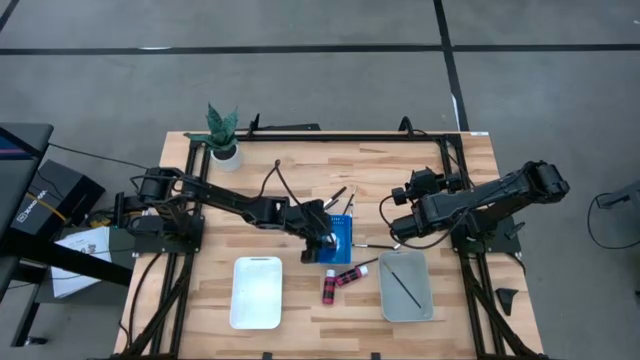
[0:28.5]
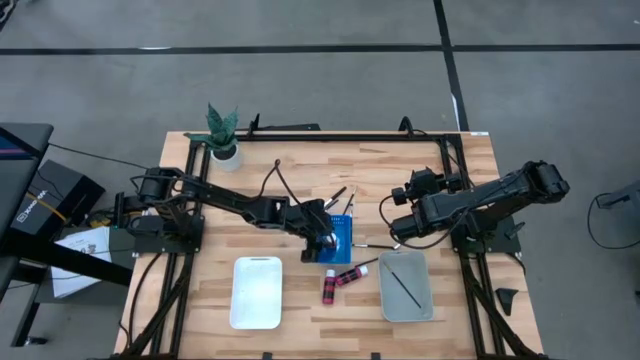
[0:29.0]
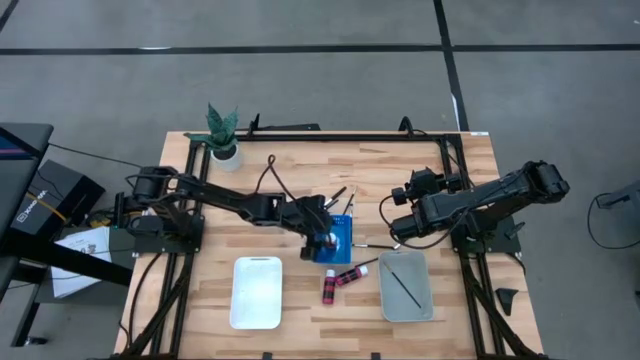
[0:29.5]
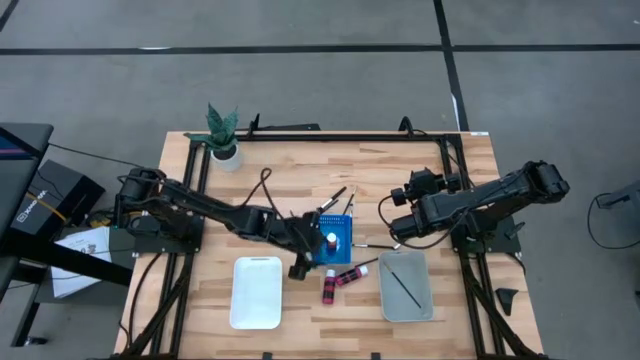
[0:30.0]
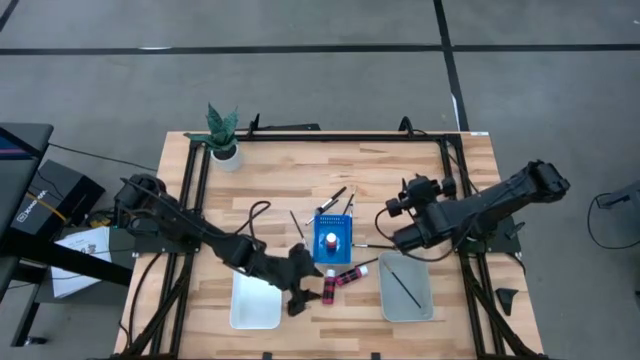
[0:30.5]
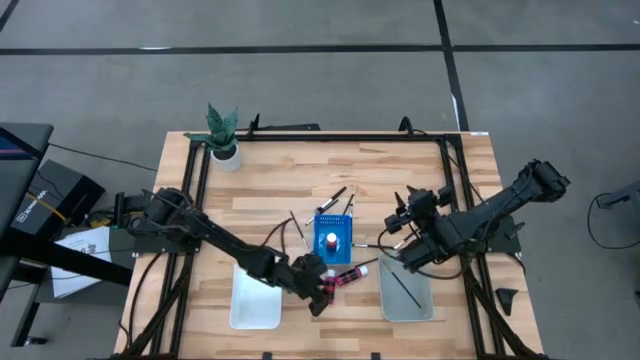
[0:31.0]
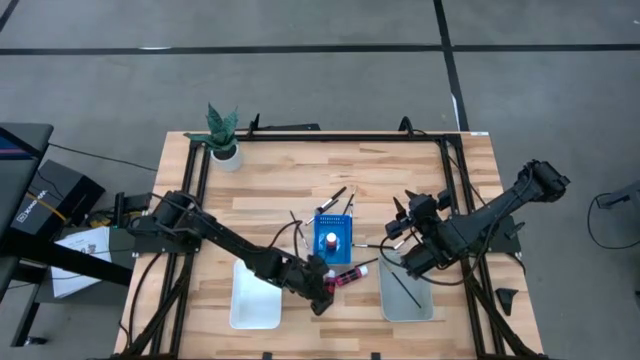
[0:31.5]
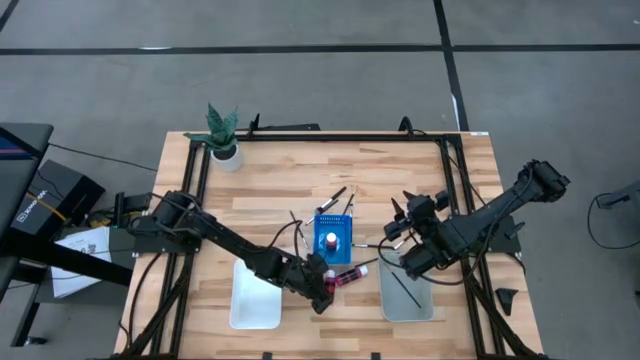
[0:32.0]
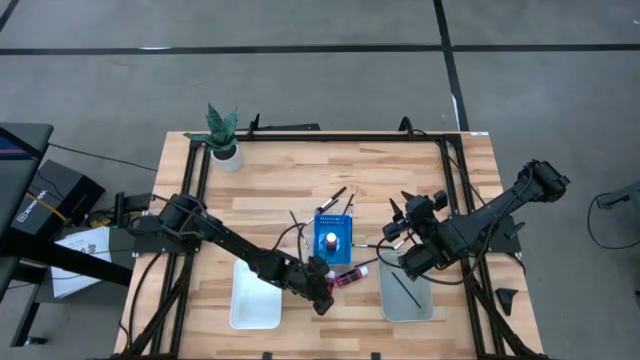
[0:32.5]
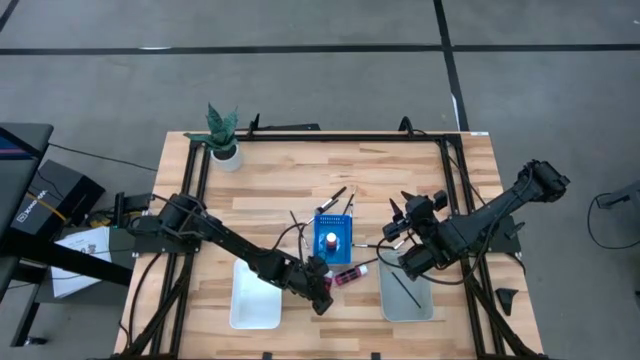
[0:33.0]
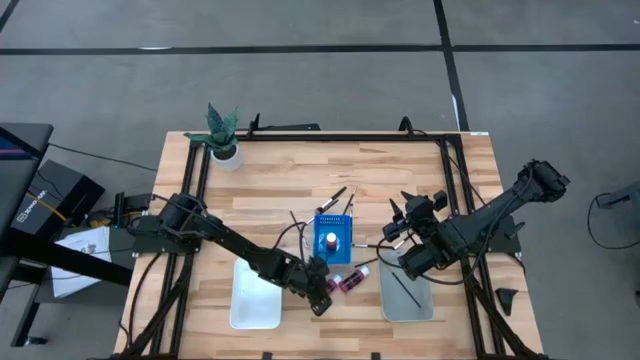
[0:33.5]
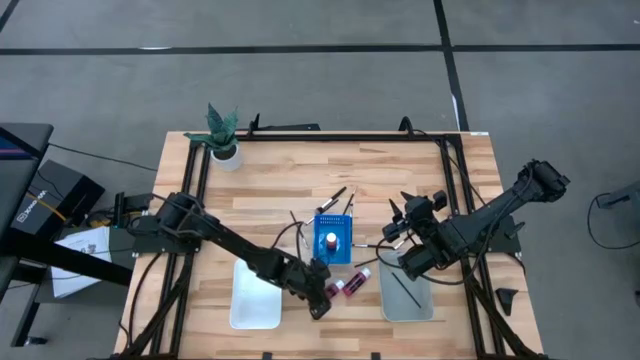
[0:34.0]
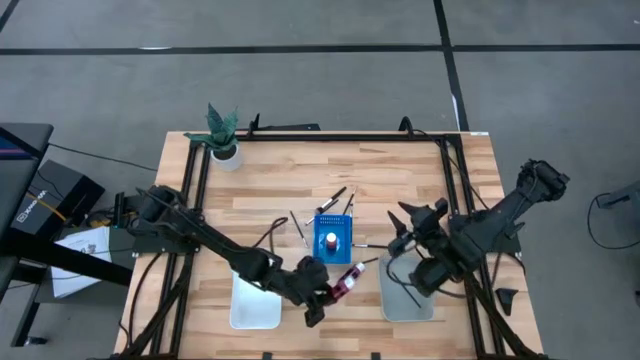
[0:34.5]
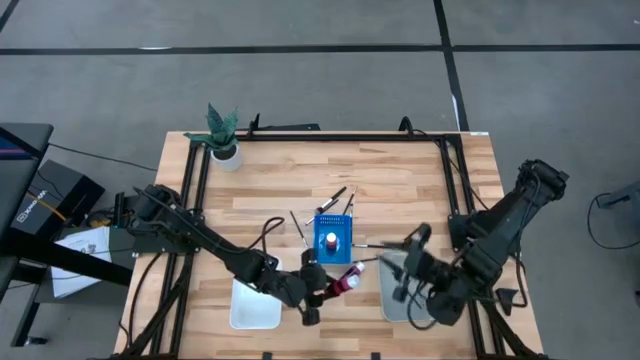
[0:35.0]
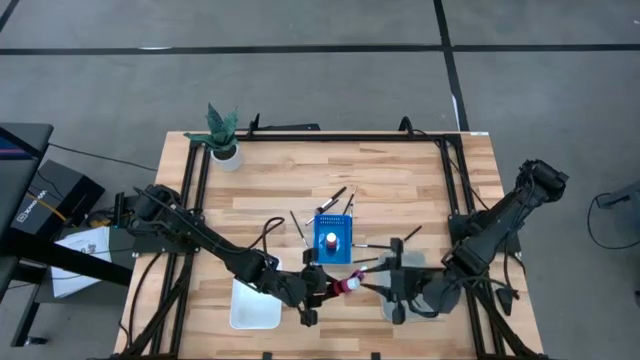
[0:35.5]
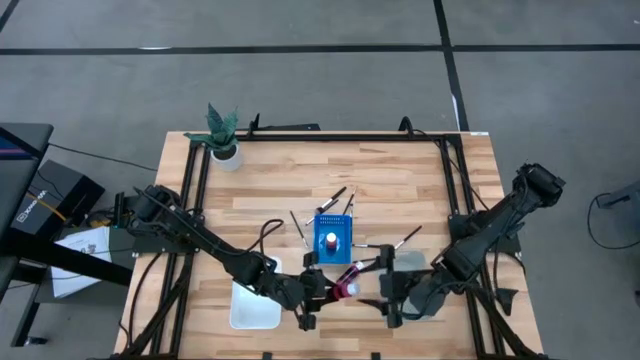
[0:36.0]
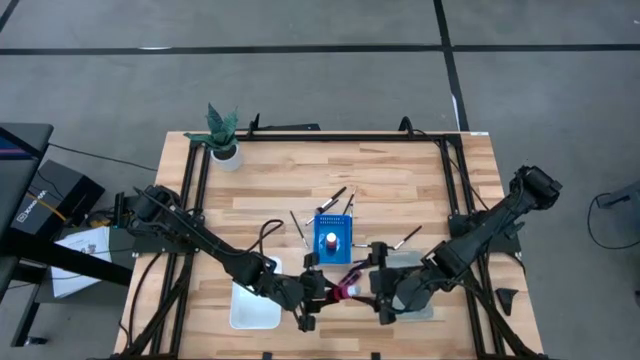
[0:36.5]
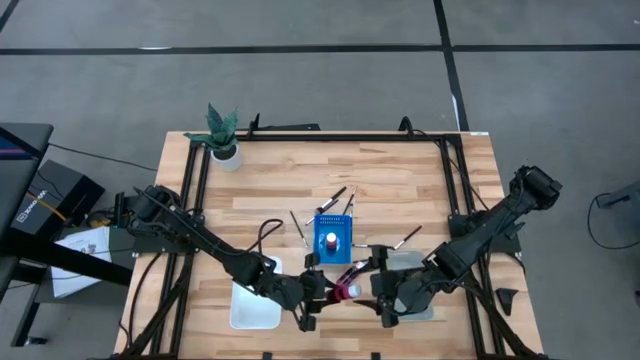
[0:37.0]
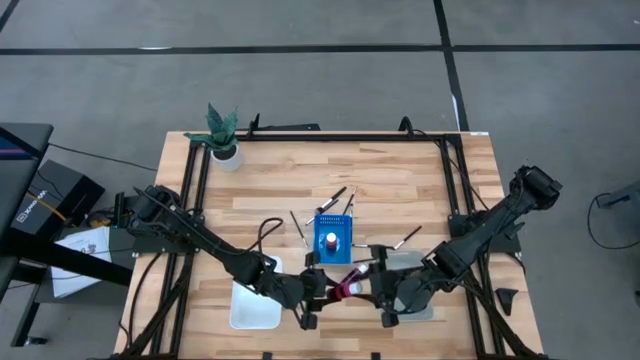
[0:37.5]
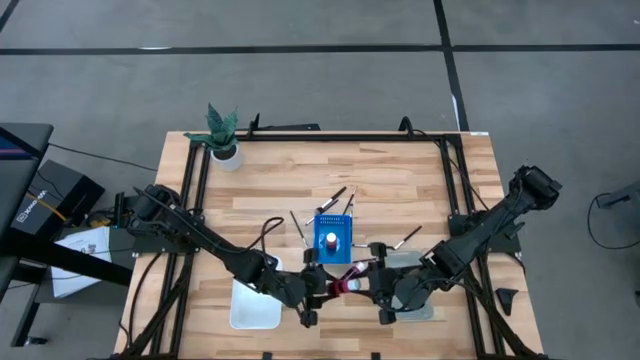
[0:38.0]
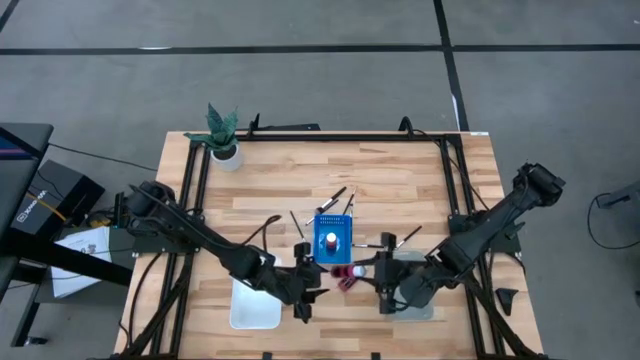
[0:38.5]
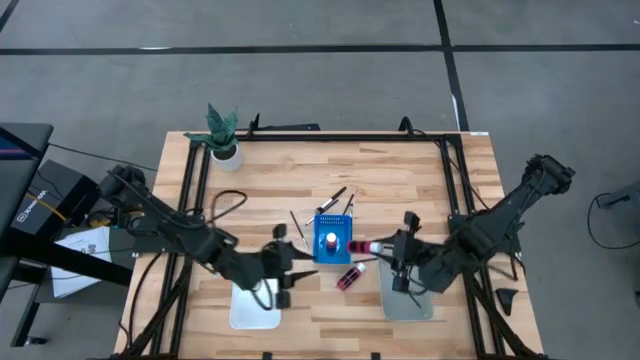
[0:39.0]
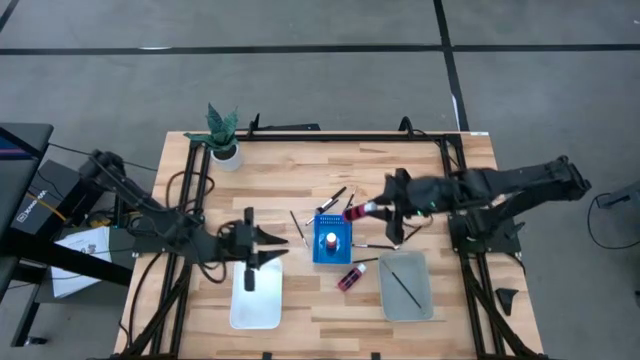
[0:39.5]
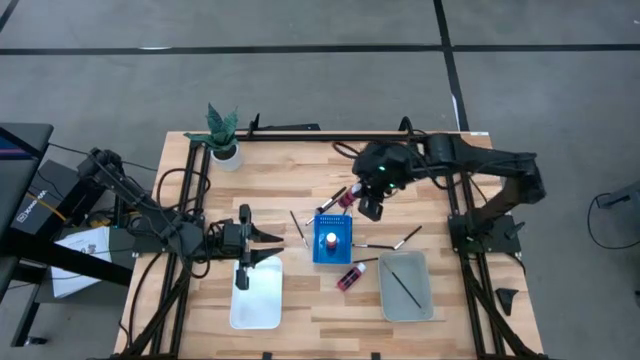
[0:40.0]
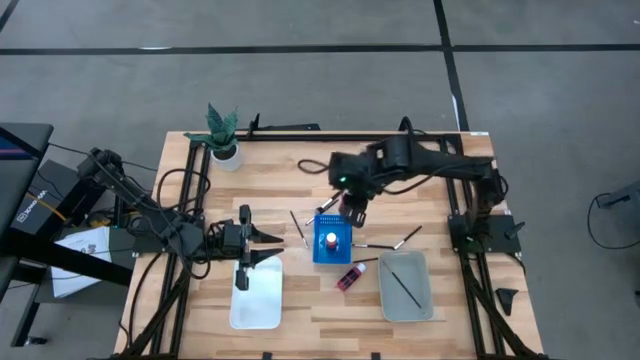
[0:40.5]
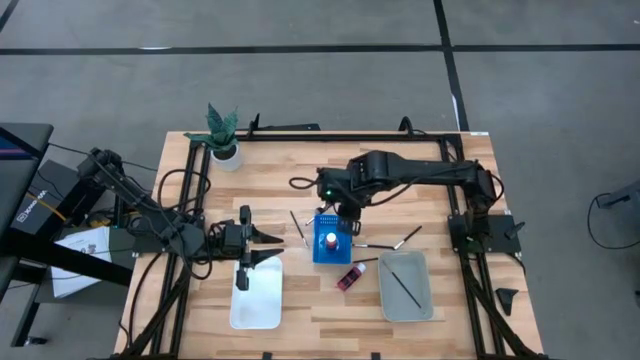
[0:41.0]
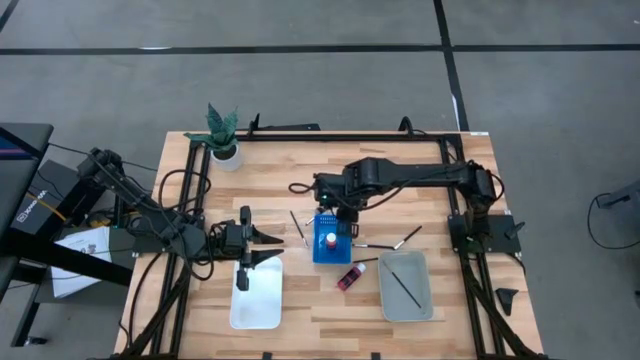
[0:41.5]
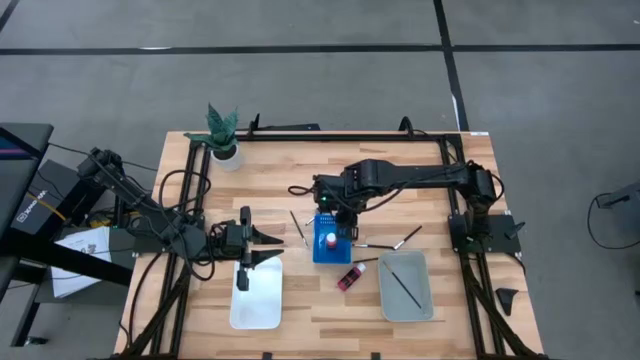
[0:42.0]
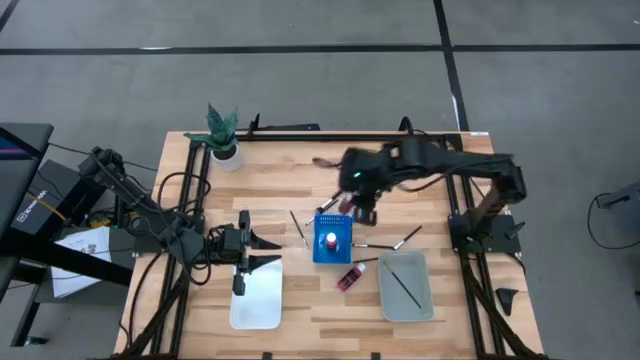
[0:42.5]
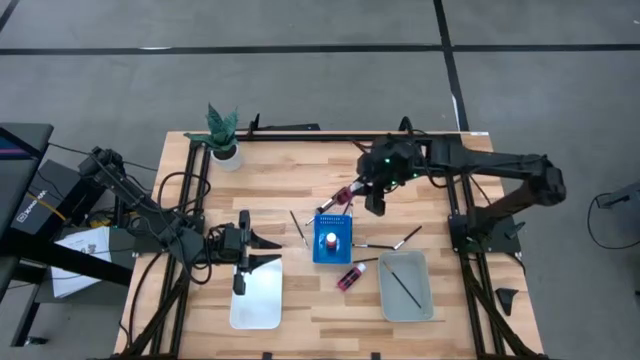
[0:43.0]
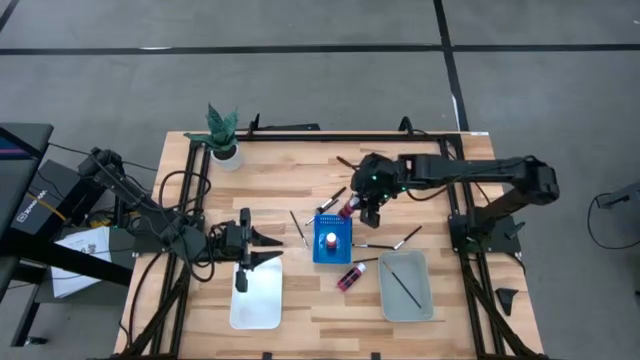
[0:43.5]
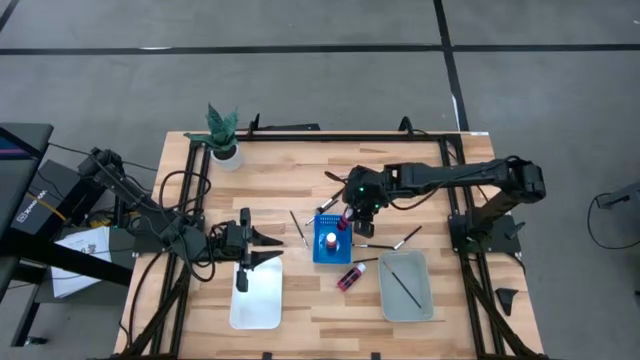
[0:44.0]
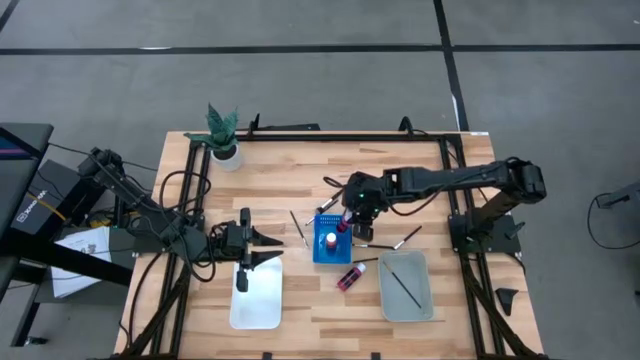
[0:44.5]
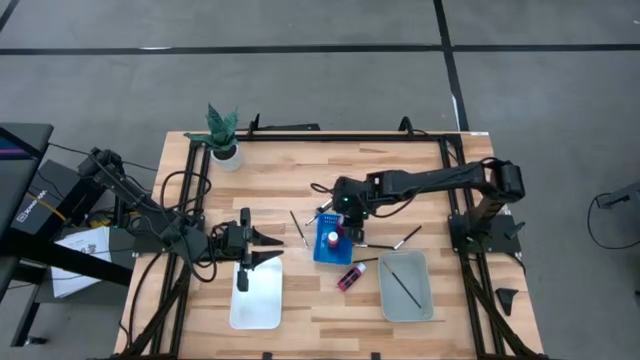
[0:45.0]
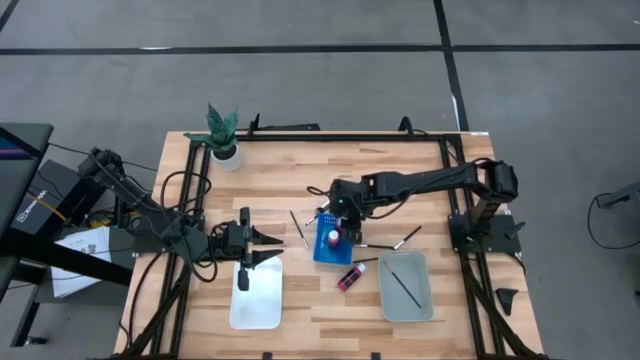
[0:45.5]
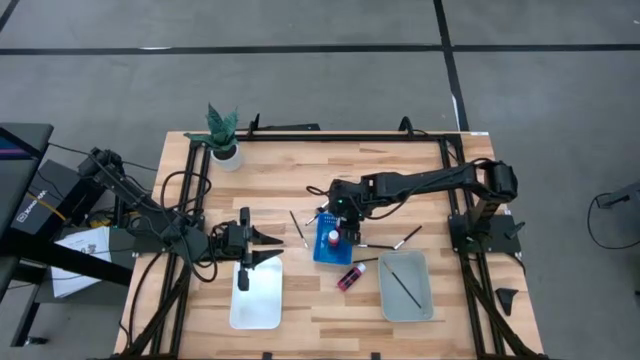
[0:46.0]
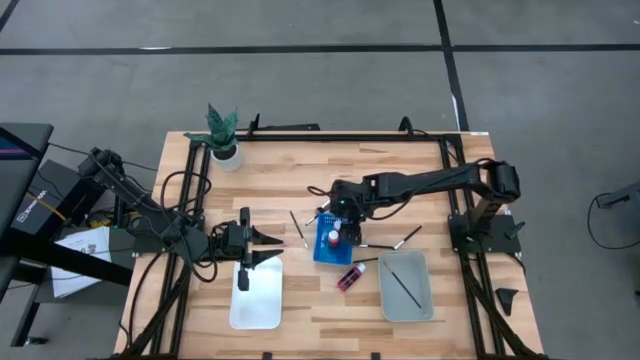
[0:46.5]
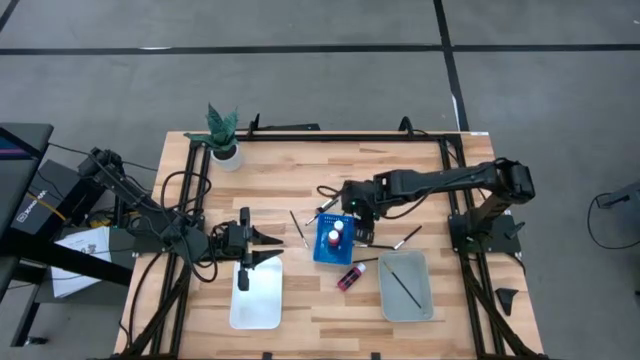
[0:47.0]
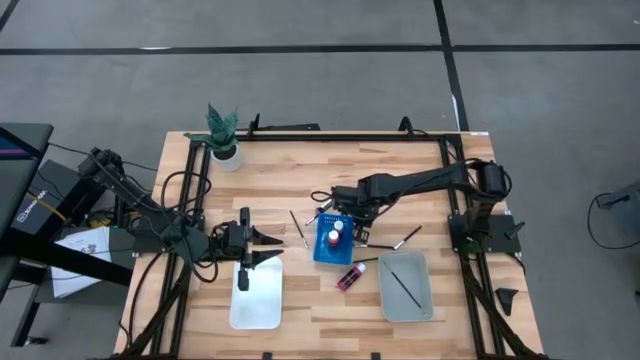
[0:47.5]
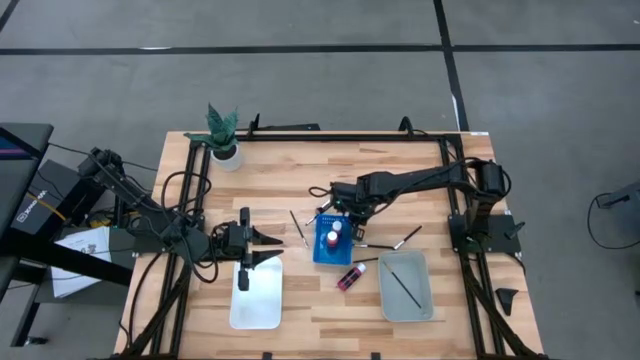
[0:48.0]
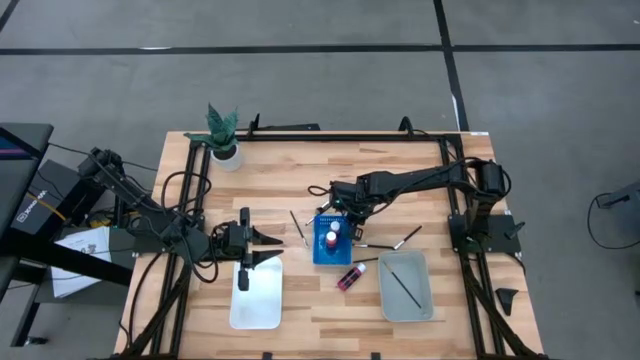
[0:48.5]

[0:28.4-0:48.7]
Task: Pick & Place Paint Supplies
Put the left pink paint bottle into the blue bin
